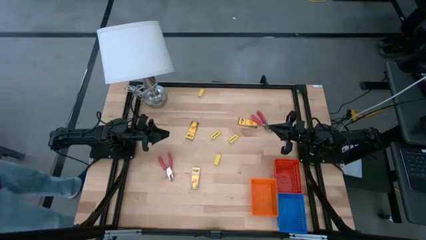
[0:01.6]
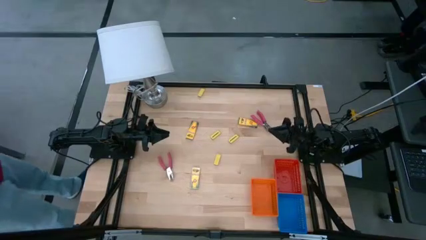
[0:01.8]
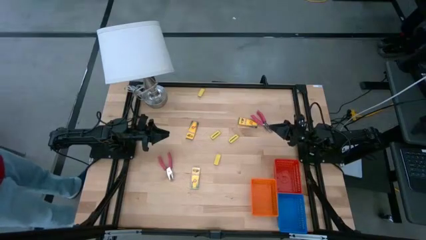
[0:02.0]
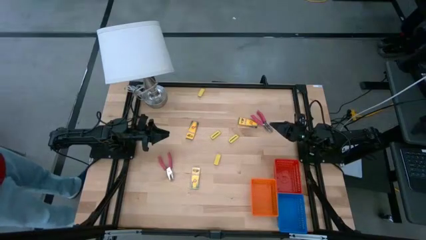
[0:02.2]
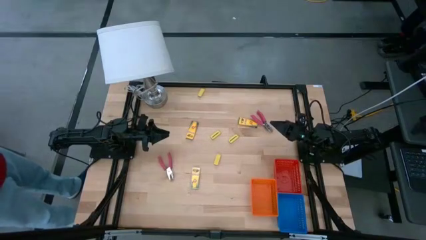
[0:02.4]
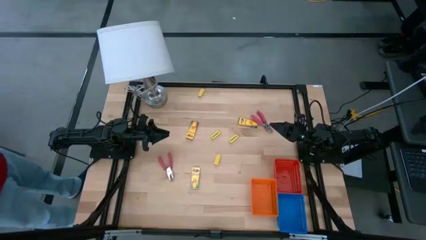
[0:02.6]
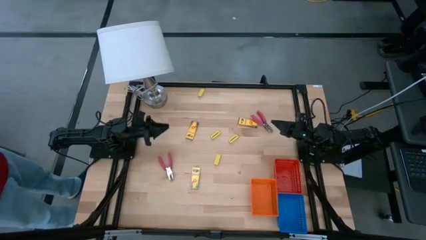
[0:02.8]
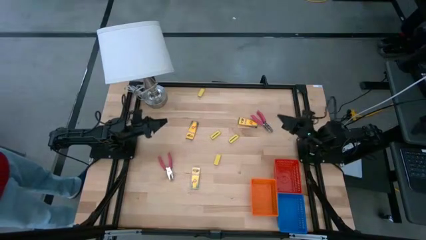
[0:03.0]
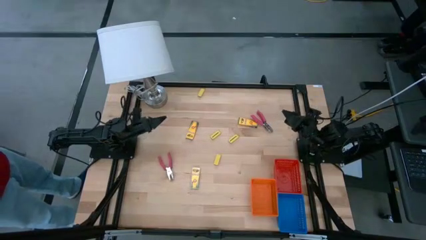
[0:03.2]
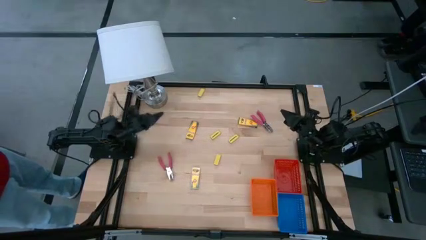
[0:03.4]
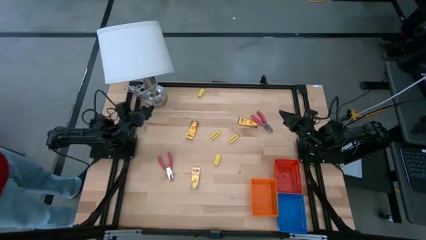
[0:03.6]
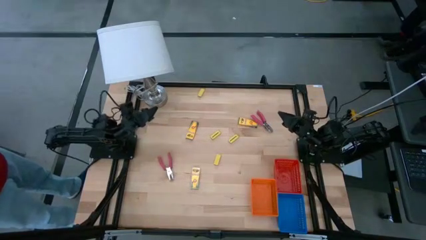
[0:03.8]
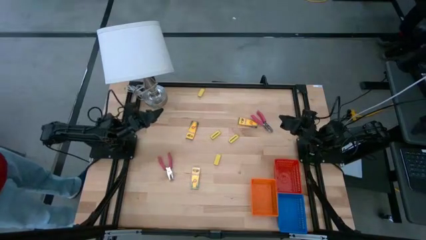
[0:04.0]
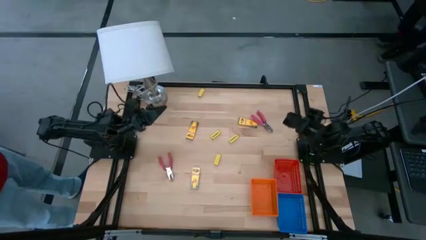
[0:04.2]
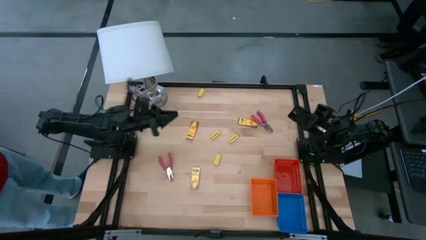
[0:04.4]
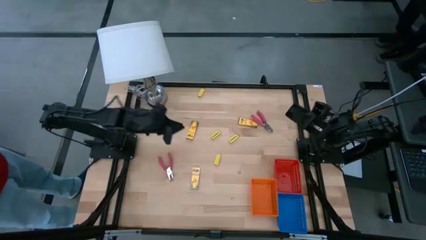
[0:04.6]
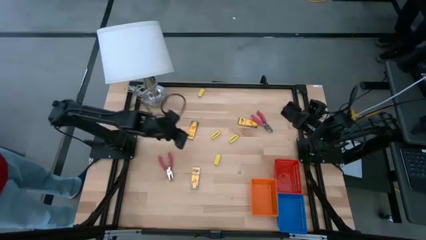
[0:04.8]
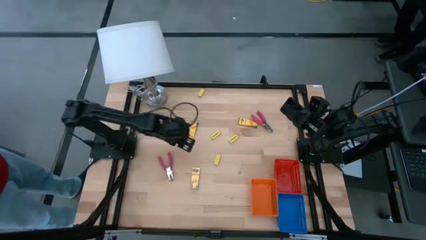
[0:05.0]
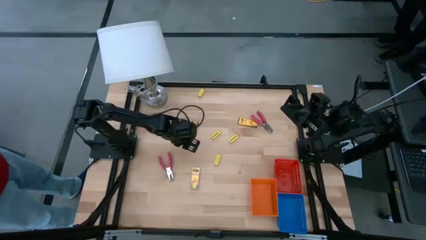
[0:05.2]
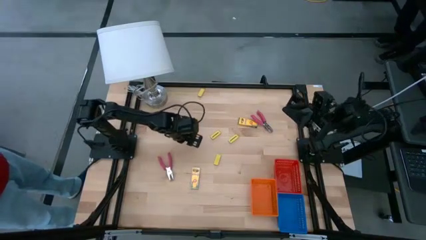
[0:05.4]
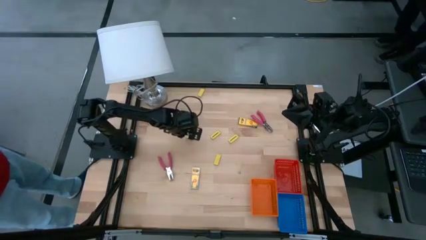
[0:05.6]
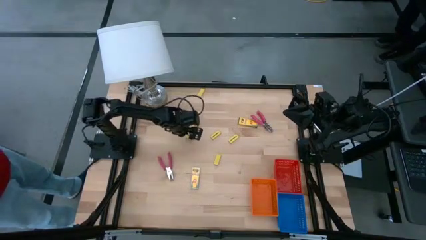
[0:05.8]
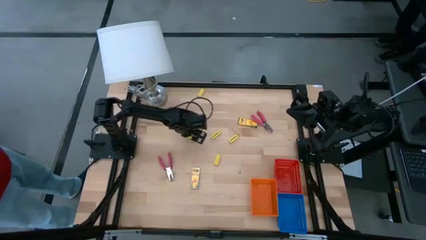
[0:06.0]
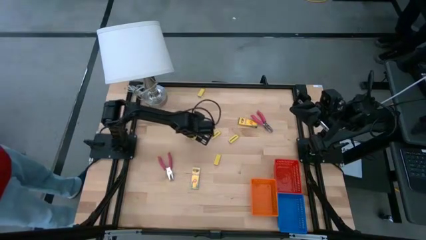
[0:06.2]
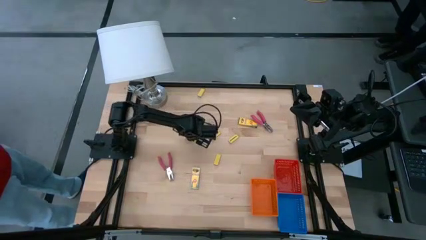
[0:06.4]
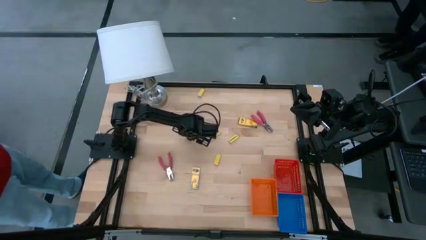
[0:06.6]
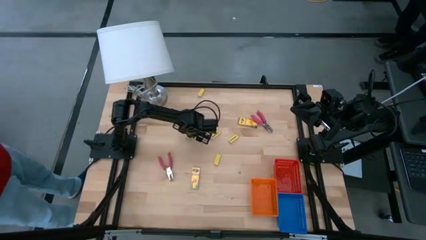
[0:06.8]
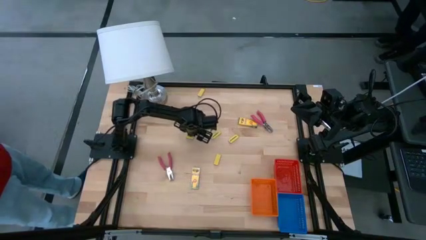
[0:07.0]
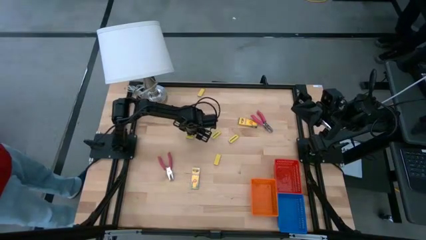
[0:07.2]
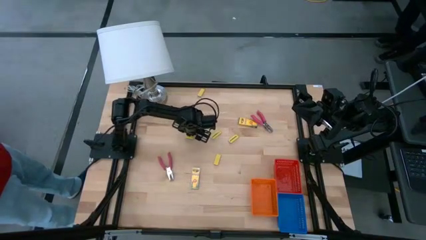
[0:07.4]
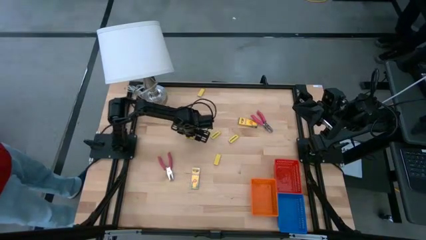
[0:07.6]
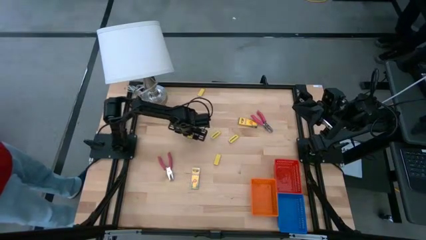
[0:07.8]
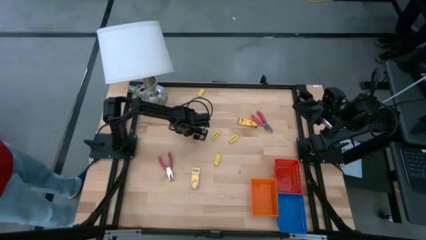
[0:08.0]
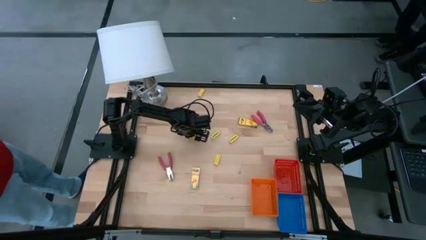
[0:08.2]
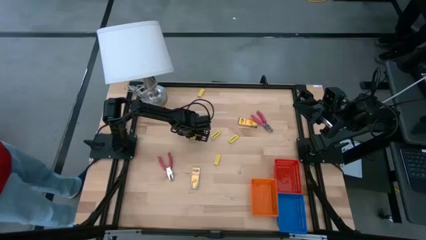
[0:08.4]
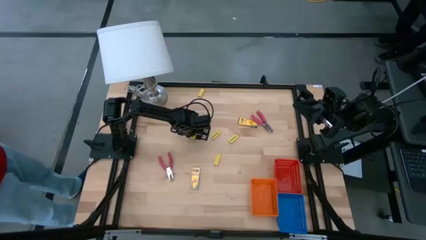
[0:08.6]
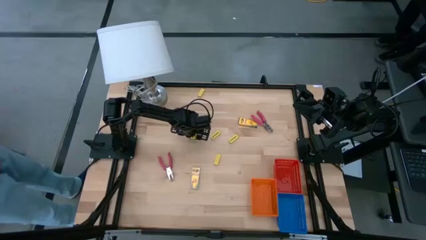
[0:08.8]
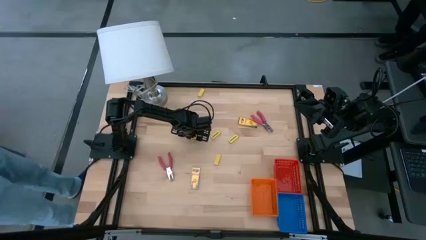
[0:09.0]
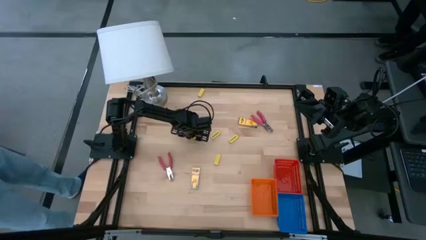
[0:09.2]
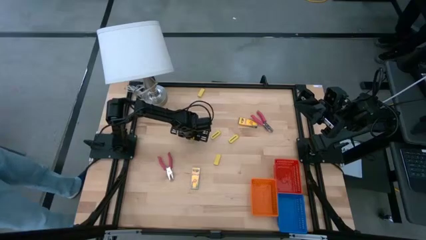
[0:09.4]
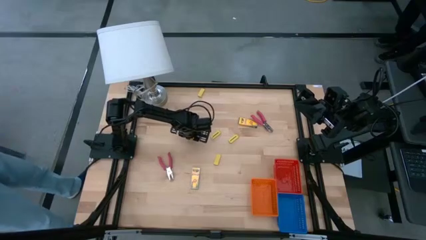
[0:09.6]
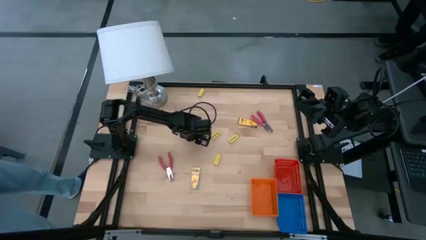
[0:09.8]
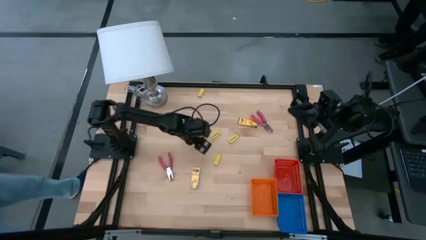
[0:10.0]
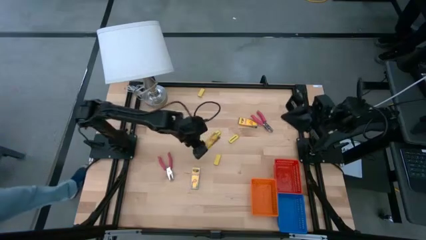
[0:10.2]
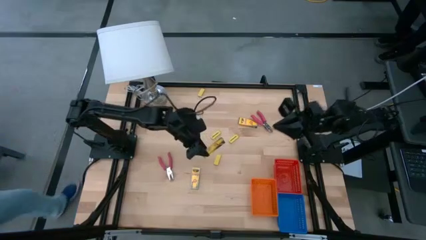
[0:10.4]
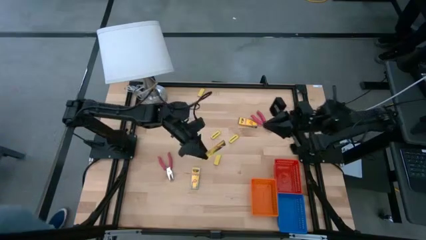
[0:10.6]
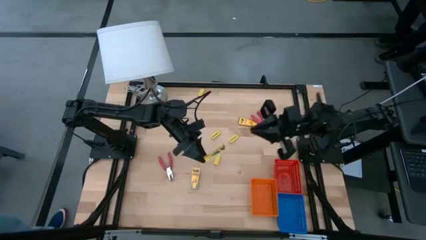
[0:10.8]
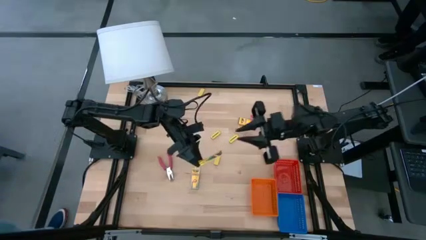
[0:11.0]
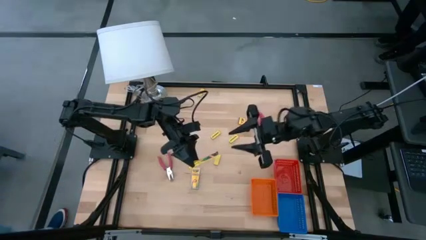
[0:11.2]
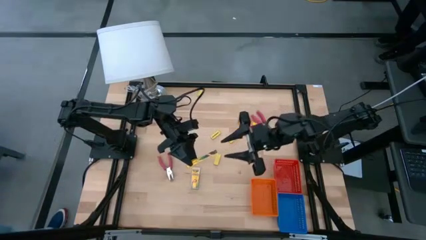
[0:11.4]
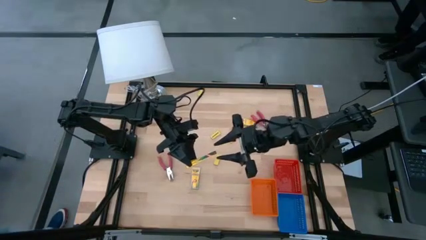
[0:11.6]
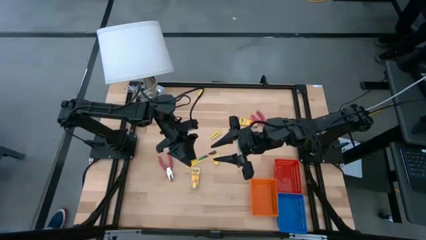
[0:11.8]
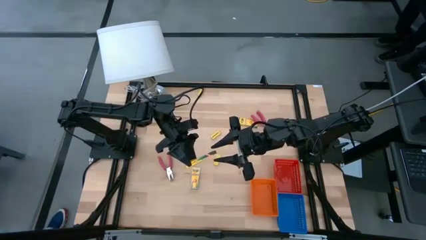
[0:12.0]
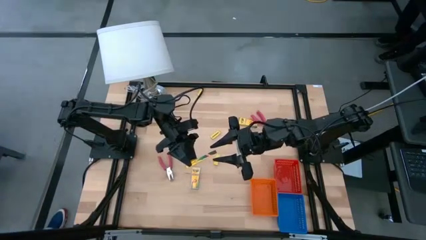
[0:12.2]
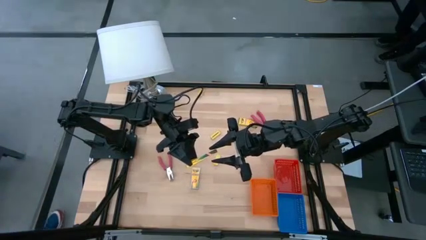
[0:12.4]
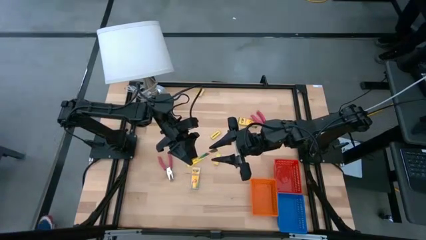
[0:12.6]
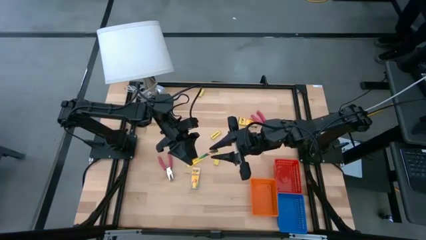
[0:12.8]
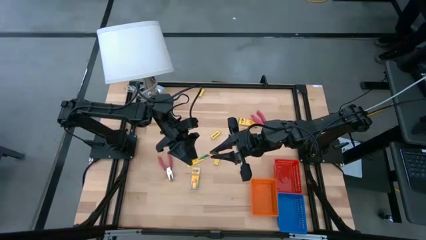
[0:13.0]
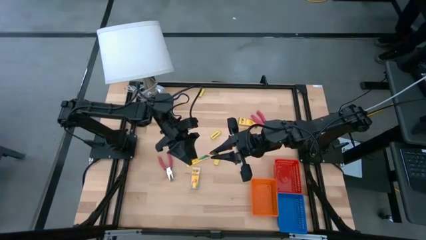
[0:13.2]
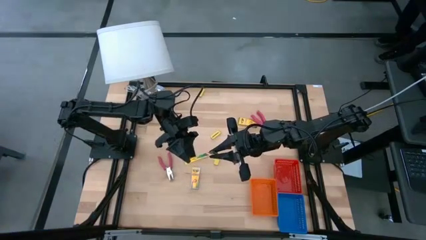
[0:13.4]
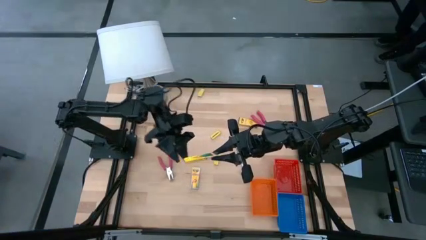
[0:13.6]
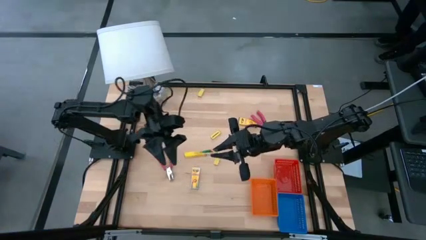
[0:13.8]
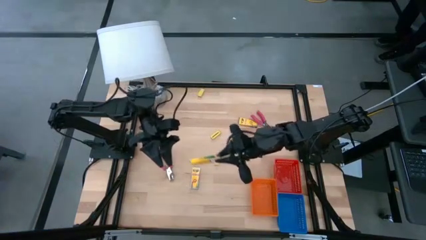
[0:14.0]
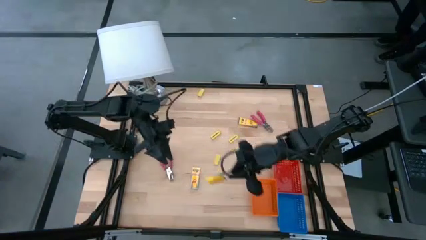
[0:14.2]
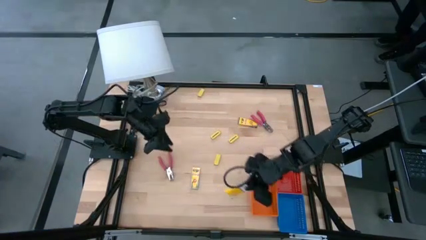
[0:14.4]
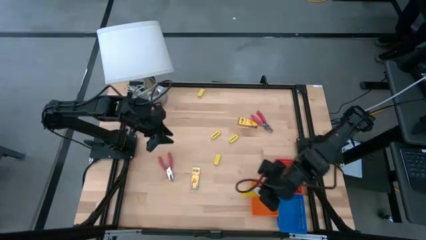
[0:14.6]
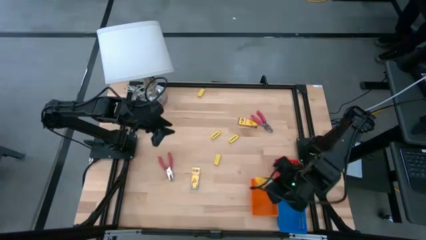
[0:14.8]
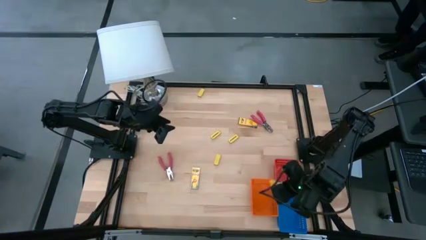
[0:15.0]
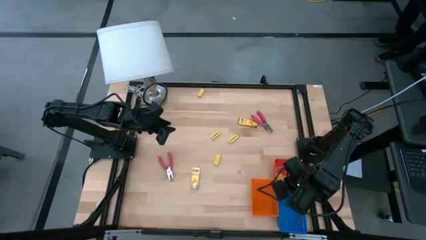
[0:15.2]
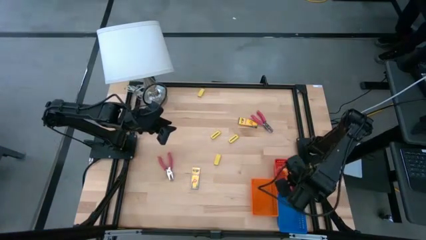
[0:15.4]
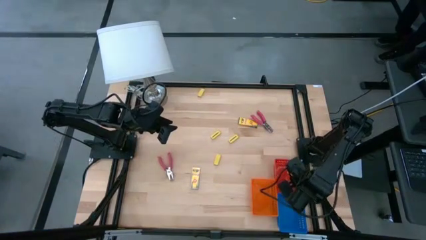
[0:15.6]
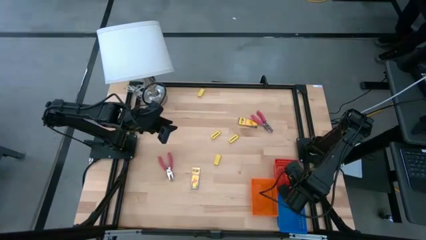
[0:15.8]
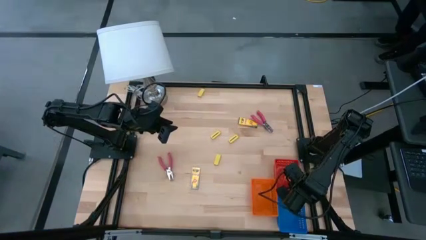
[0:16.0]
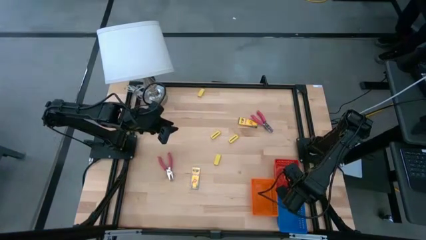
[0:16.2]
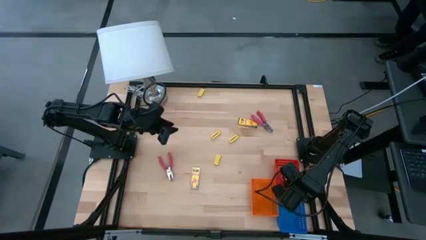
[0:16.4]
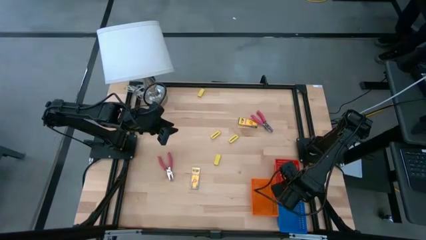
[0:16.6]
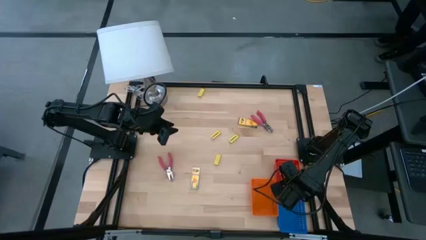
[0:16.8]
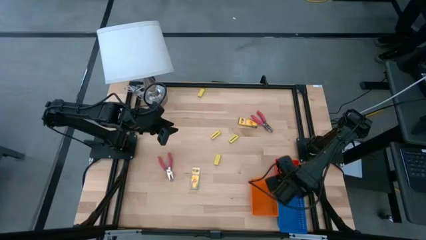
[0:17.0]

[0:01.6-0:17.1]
Task: Pick & Place School Supplies
Put the yellow crayon box into the red basket
